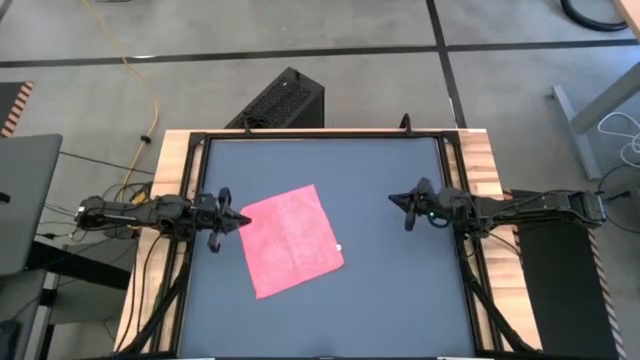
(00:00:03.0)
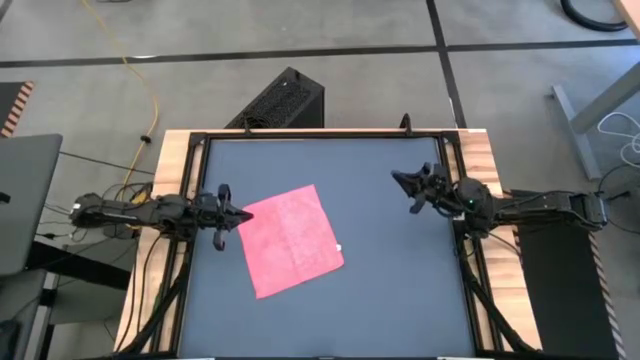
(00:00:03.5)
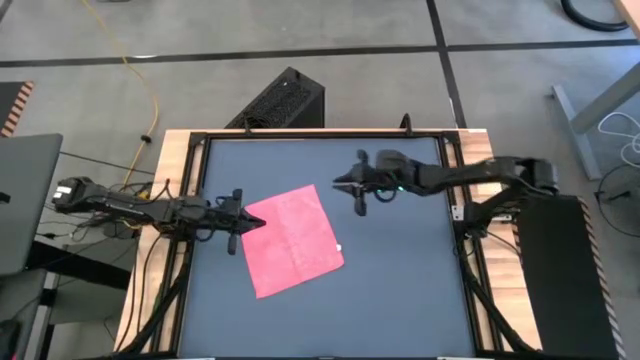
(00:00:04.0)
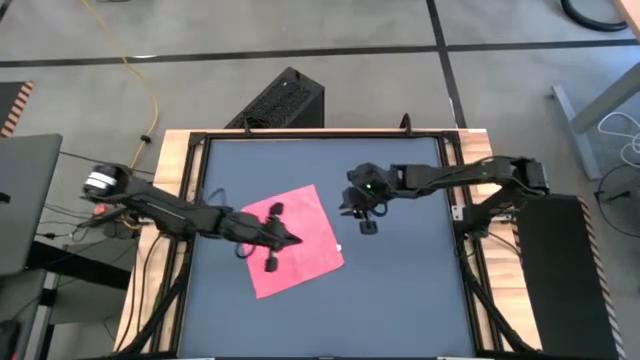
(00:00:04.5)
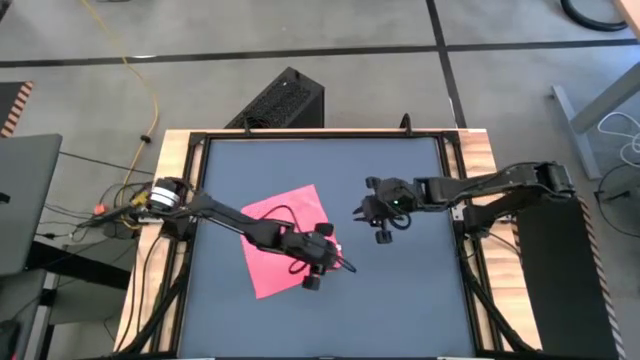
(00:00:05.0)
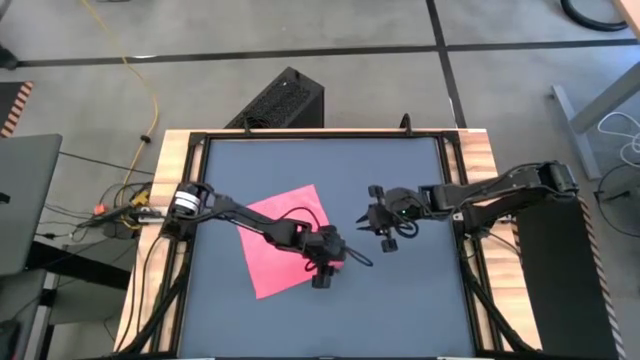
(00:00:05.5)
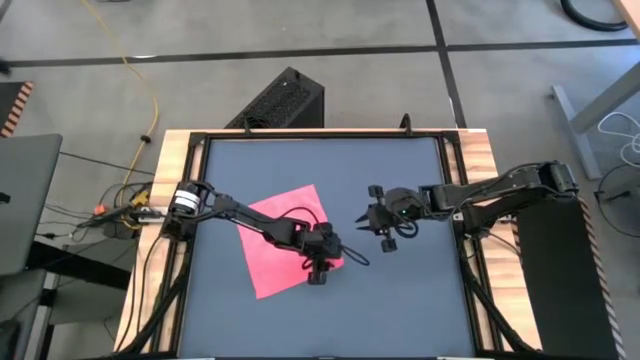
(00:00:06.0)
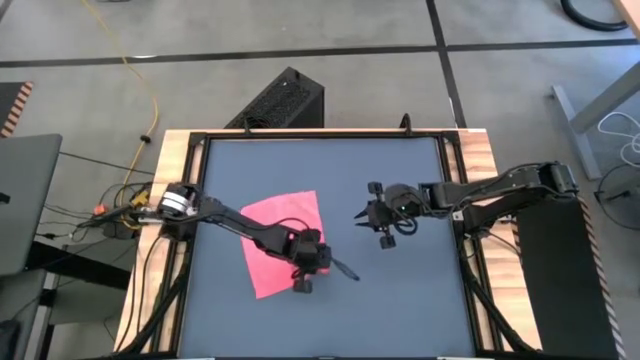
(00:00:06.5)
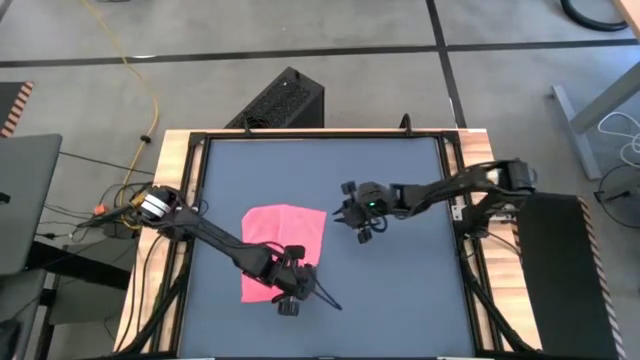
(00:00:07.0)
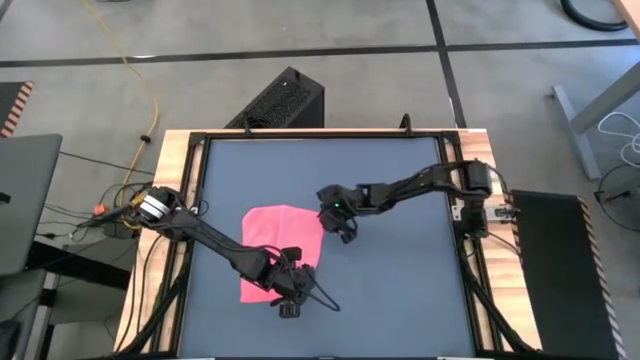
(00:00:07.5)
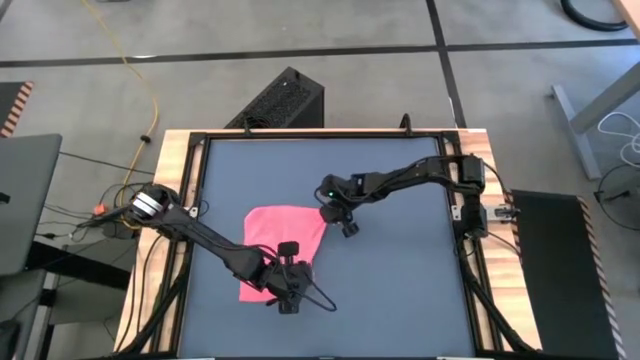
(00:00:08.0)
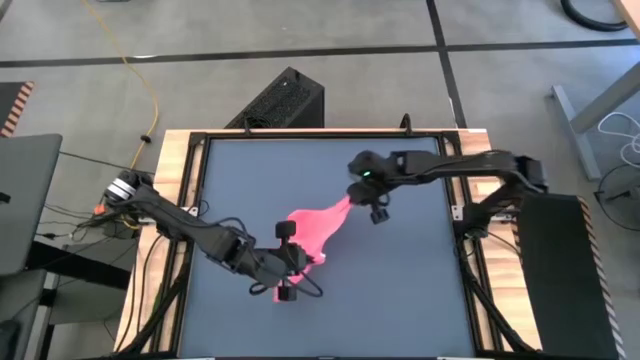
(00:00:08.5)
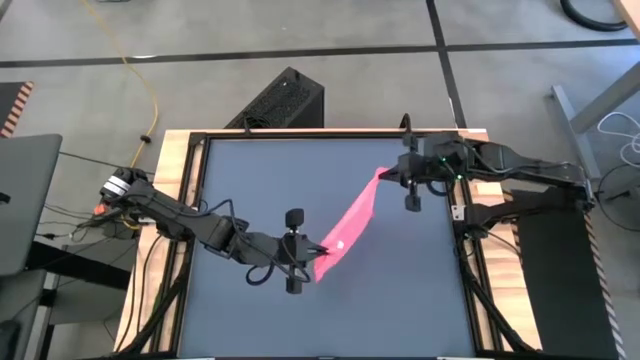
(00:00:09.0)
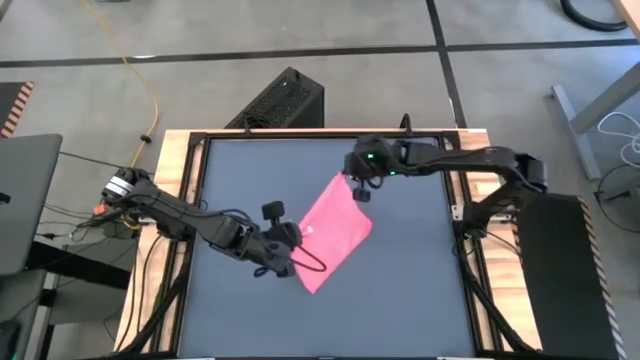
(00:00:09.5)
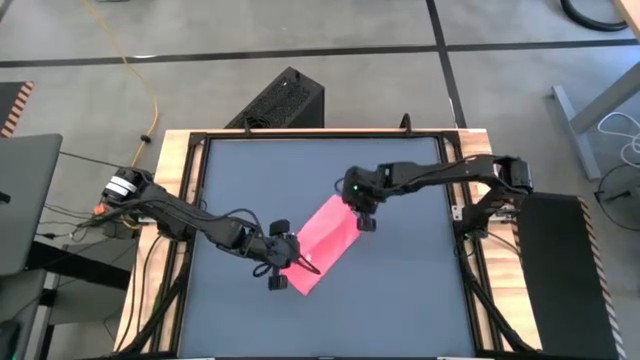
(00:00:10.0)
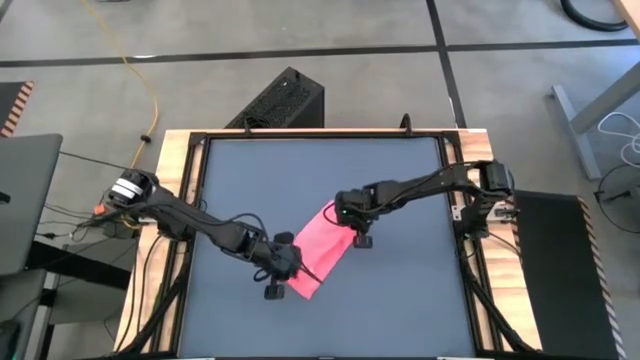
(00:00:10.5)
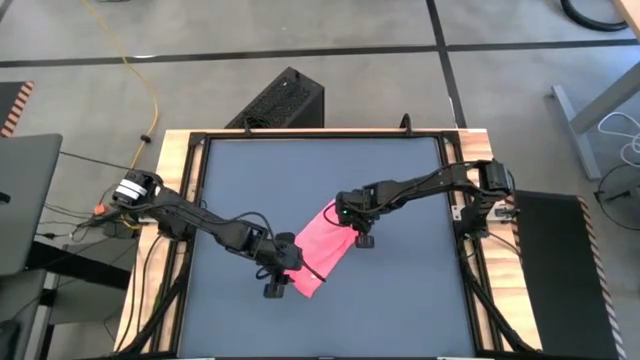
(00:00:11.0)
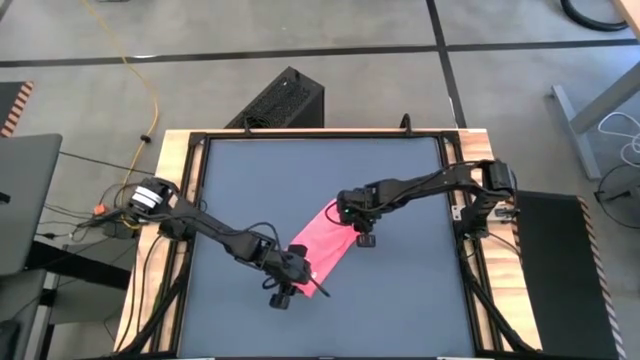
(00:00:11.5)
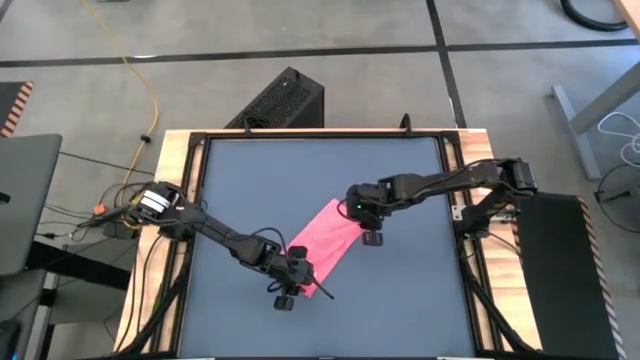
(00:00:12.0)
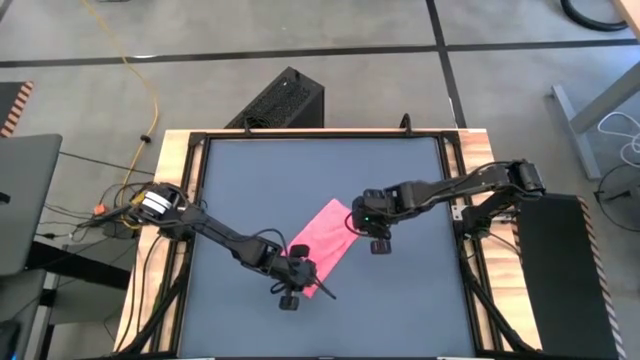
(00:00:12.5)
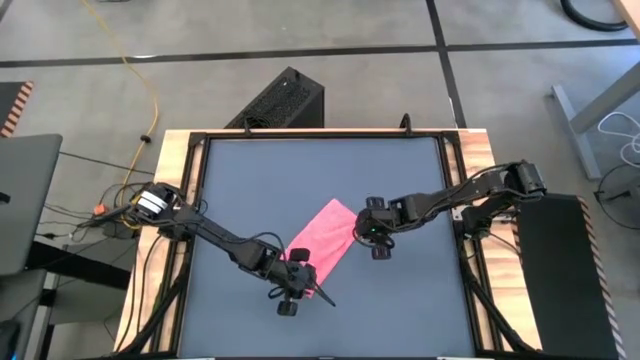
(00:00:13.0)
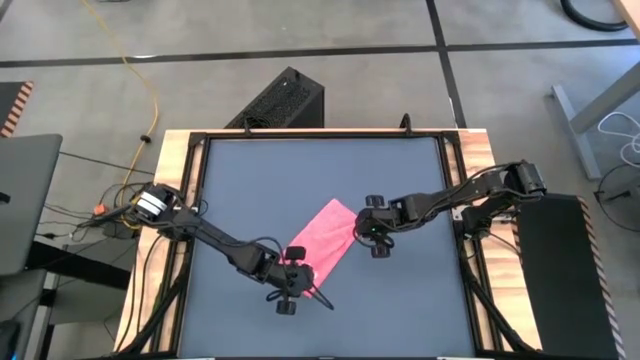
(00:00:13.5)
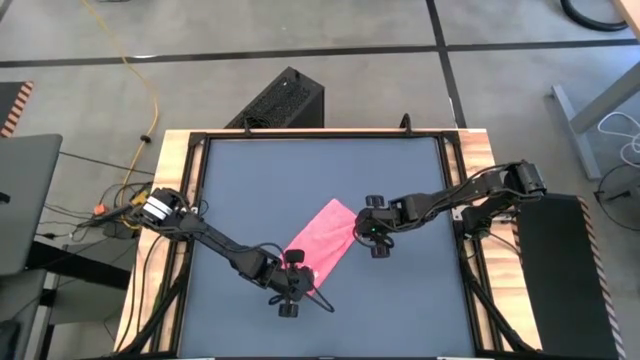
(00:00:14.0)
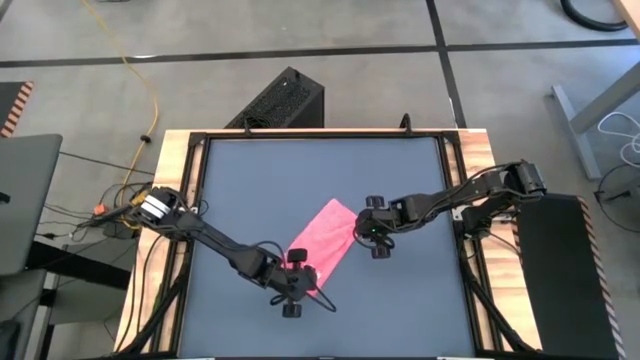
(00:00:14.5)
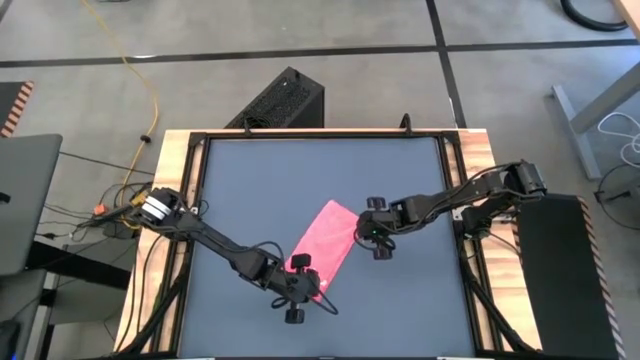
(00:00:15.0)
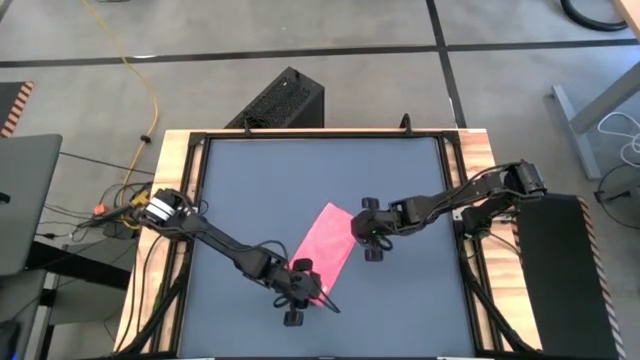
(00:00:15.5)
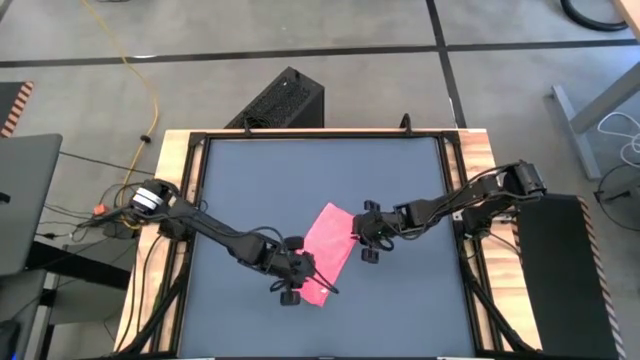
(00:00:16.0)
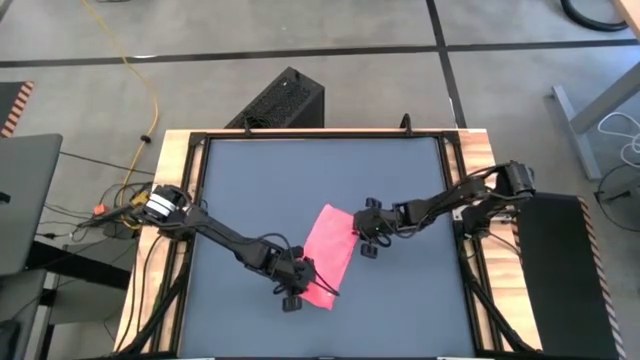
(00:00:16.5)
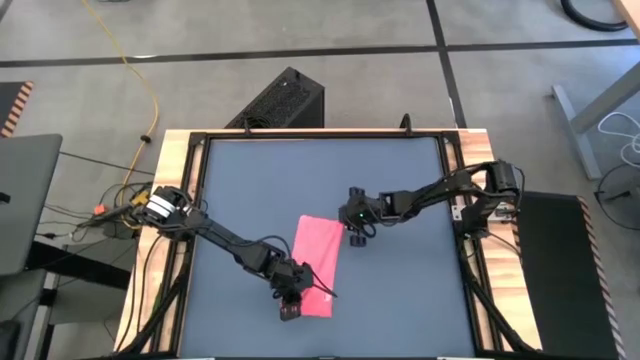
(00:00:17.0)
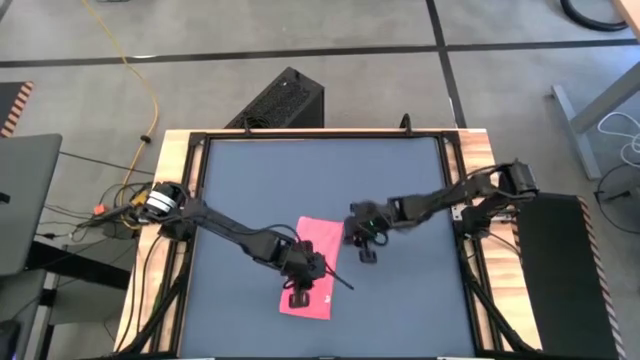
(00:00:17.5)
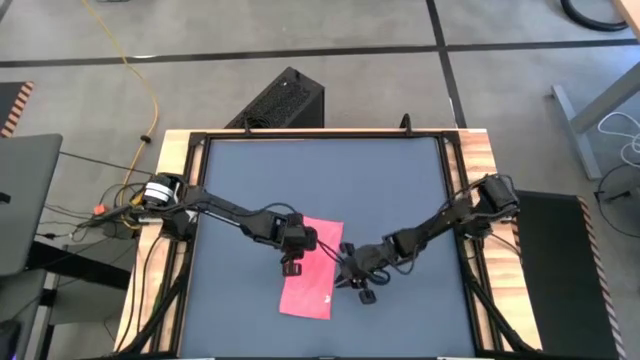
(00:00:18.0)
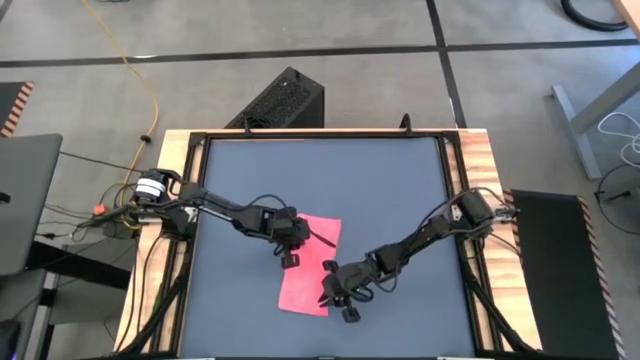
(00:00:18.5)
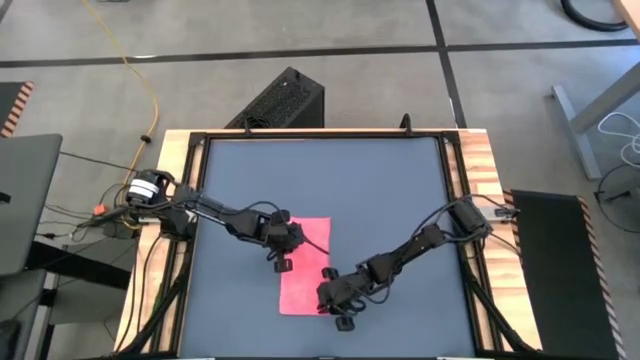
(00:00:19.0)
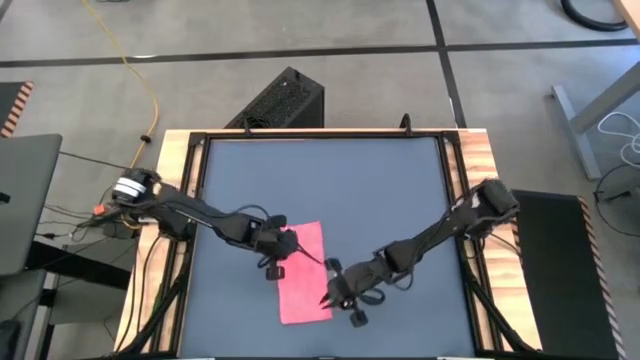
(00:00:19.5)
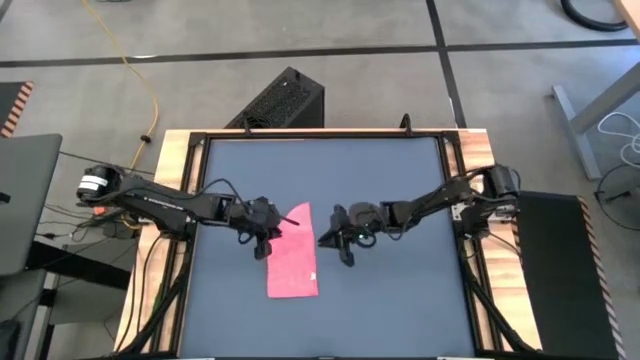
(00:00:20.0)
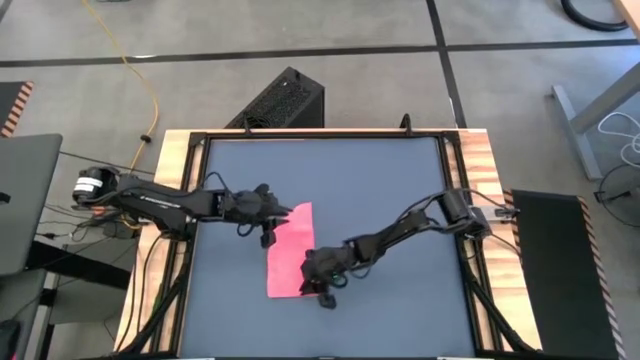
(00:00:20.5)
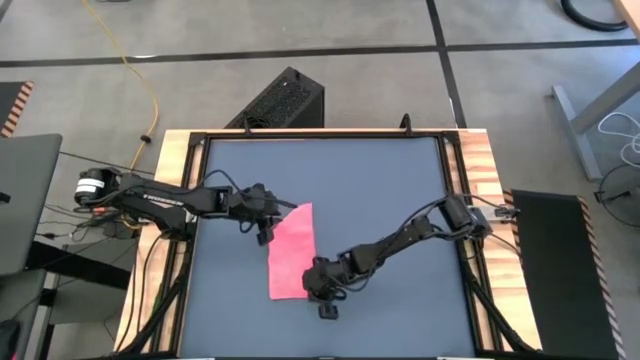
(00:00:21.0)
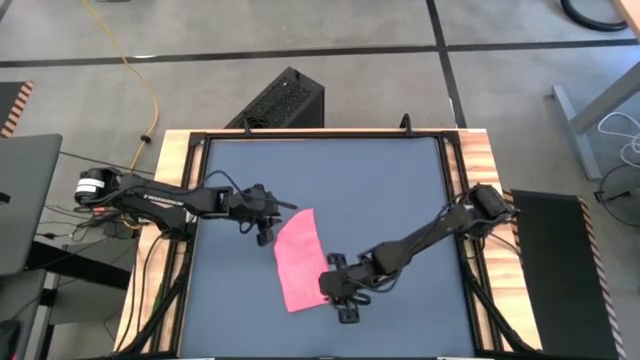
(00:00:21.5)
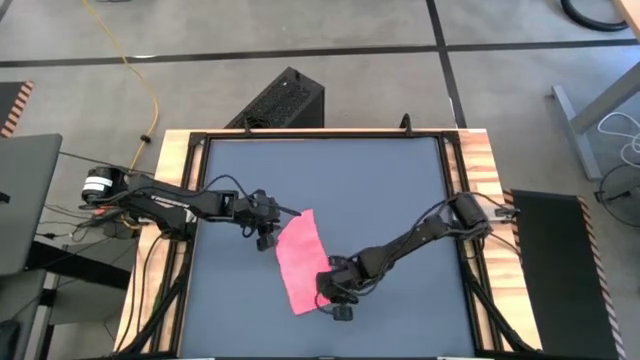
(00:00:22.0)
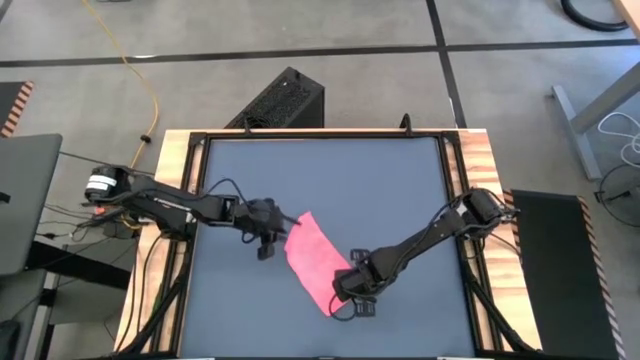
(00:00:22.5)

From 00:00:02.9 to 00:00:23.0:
Task: Roll towel
Roll the light red towel
